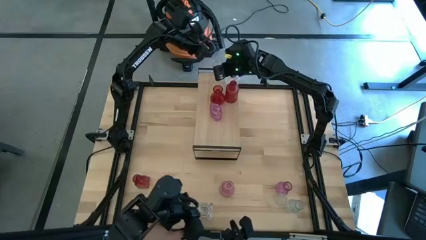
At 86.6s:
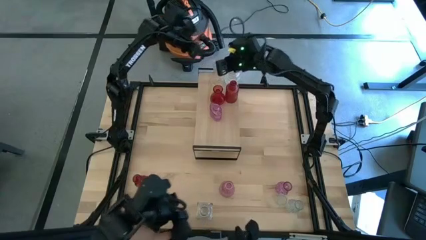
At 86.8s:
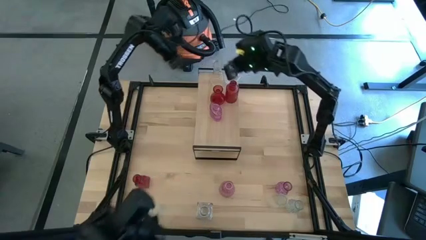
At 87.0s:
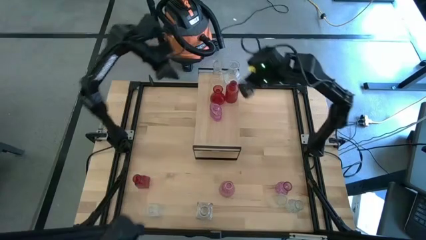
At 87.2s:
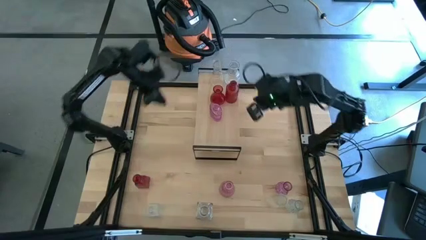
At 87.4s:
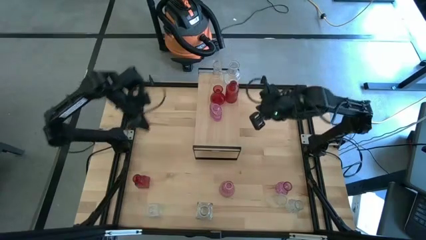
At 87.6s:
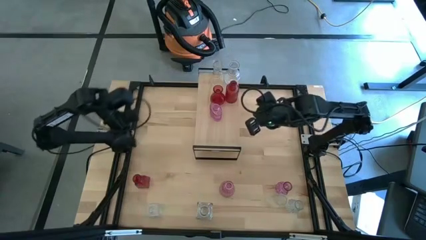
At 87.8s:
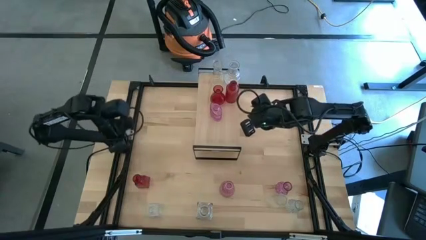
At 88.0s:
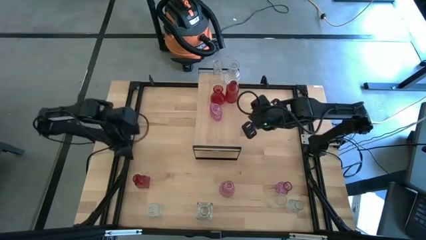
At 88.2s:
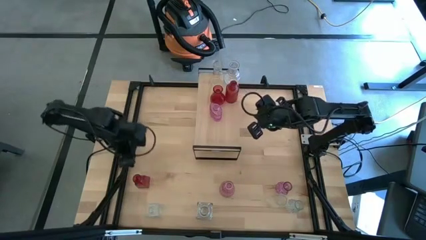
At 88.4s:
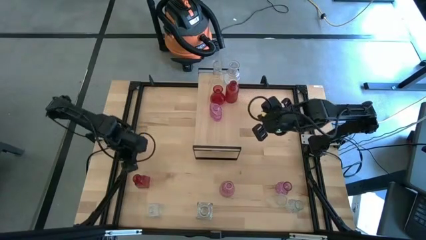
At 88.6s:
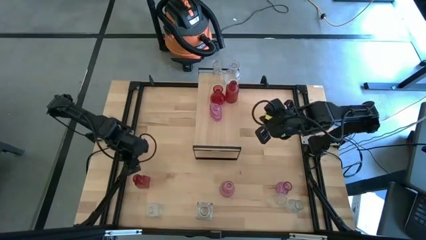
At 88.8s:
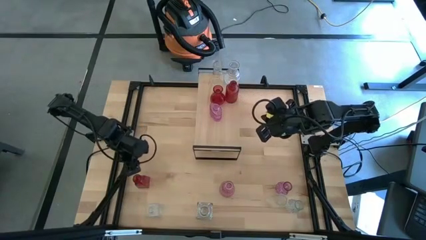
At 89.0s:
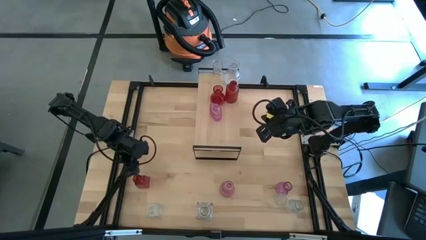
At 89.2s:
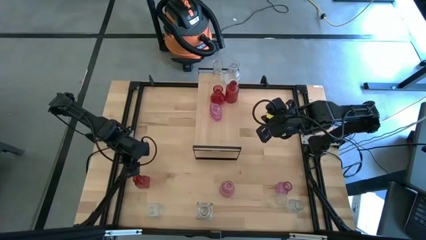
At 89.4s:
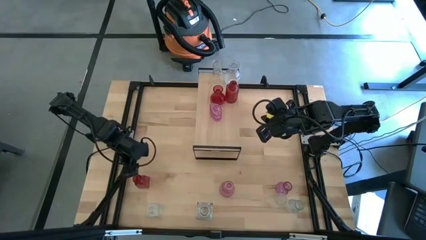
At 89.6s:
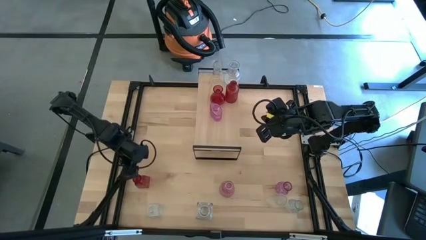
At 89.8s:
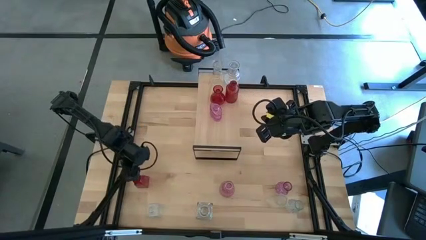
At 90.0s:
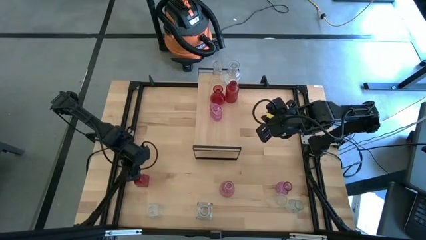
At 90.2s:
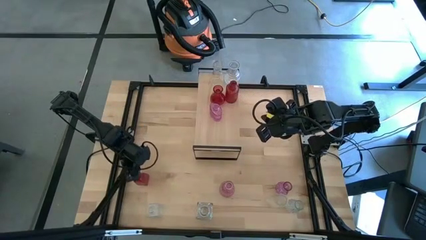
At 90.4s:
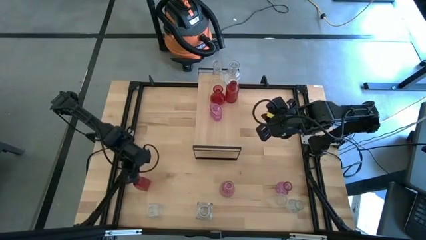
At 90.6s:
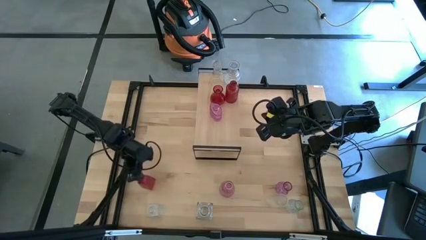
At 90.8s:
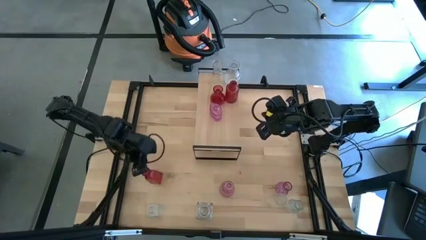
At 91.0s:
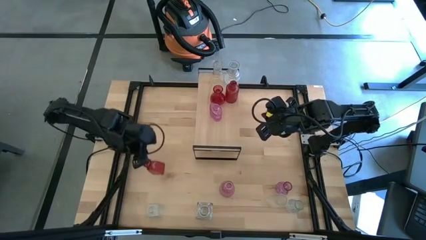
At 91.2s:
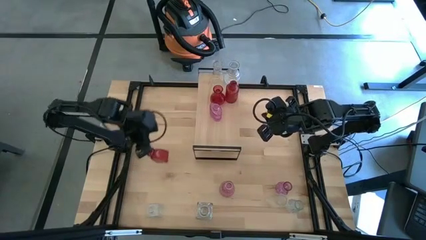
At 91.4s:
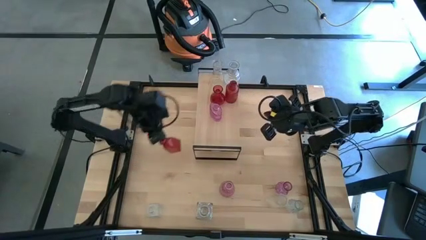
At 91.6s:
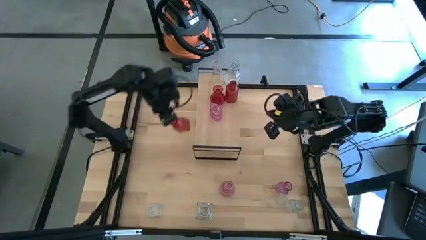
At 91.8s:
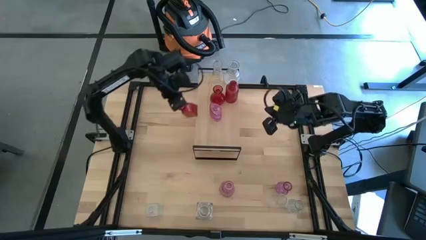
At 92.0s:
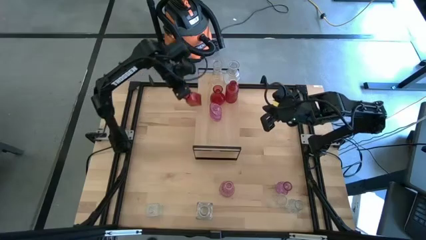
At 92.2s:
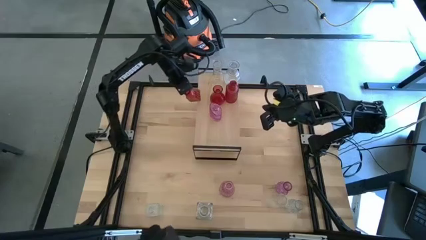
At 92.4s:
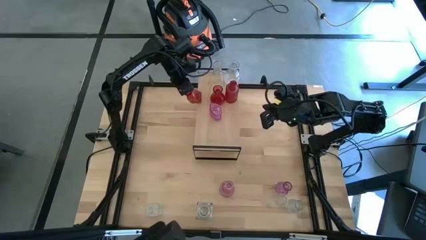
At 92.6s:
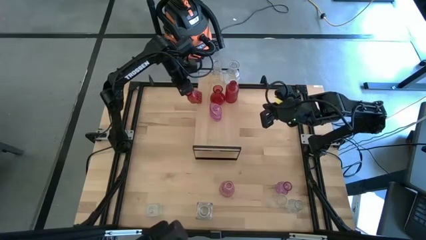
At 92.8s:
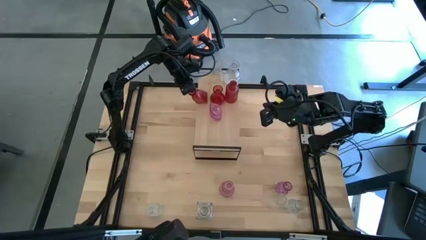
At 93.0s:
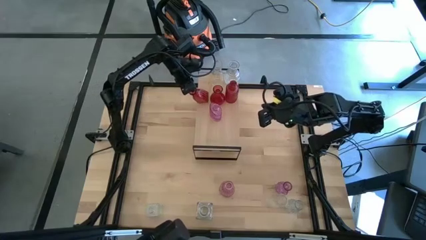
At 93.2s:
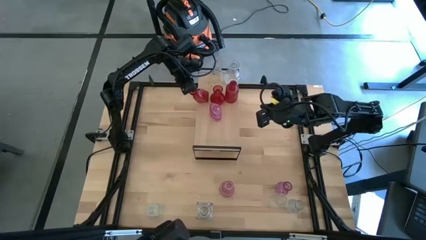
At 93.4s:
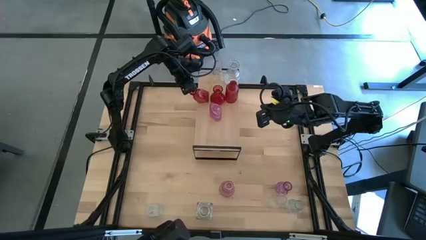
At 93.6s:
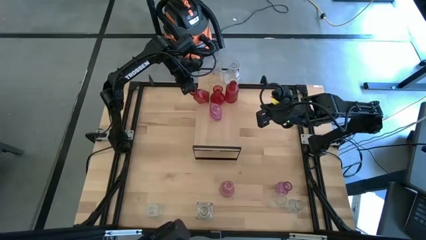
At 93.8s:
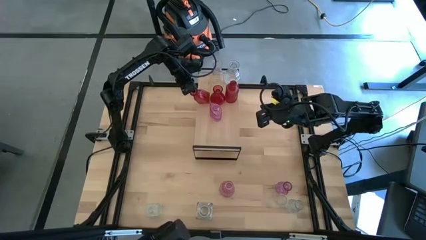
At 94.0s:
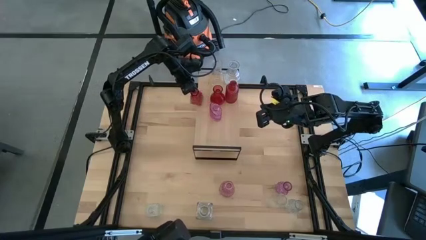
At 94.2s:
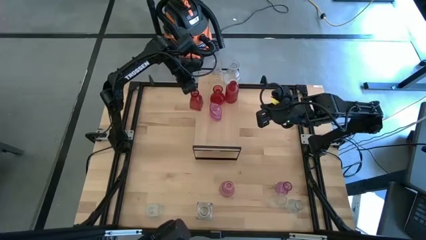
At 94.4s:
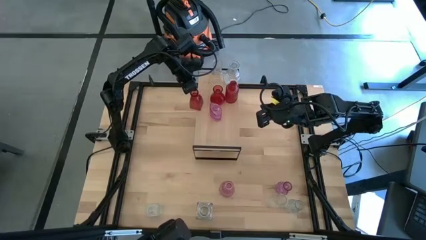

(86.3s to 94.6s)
Task: sort vases onto shelf
Put the red vase on the shelf aligned with the other red vases

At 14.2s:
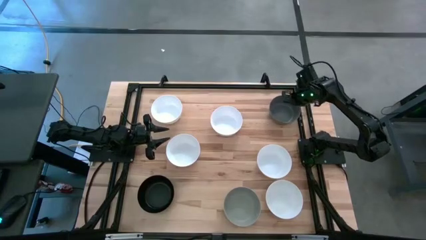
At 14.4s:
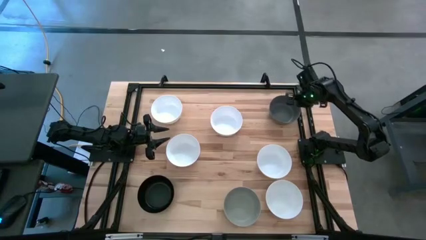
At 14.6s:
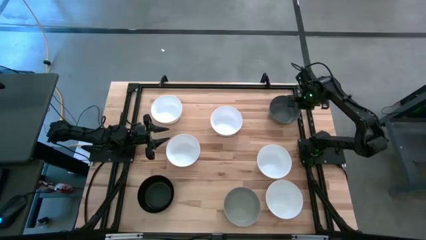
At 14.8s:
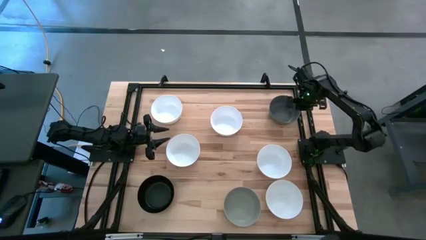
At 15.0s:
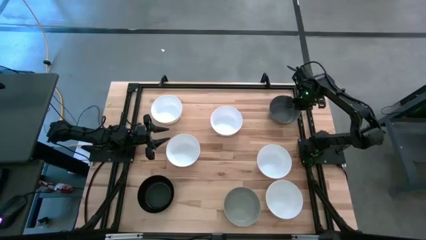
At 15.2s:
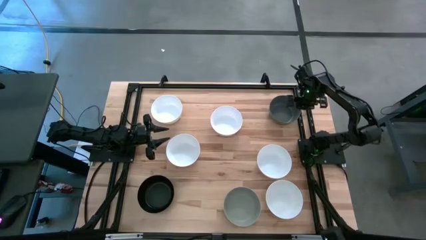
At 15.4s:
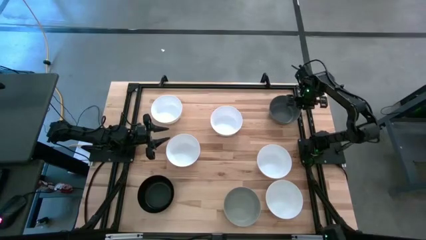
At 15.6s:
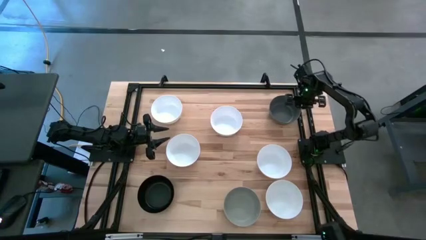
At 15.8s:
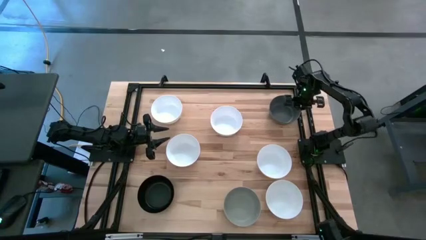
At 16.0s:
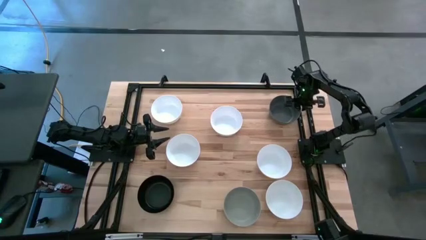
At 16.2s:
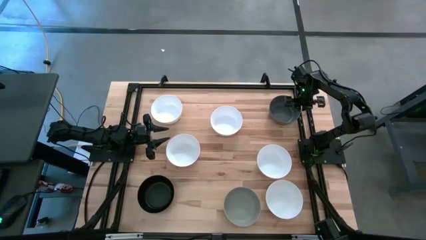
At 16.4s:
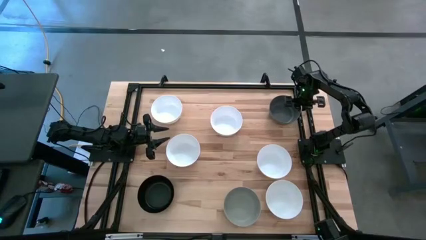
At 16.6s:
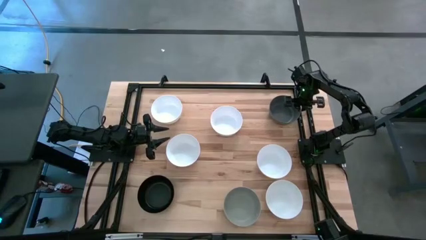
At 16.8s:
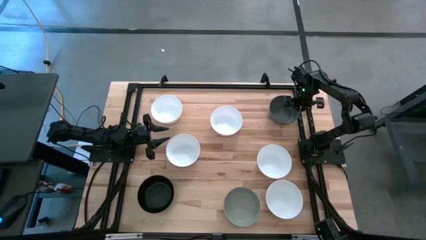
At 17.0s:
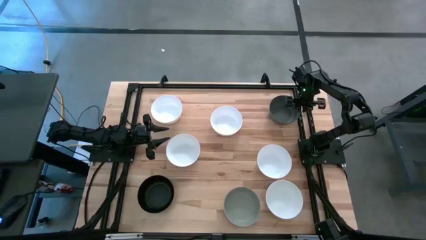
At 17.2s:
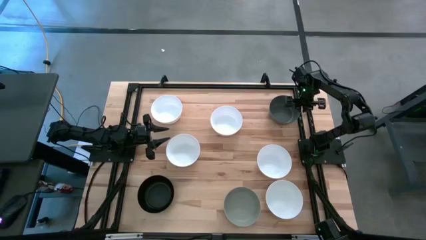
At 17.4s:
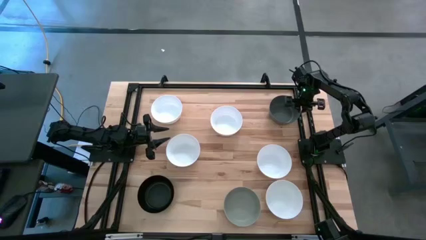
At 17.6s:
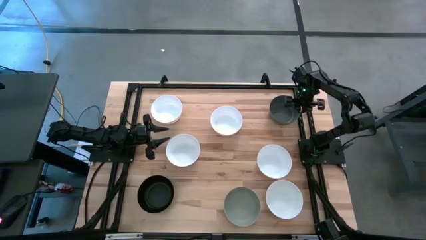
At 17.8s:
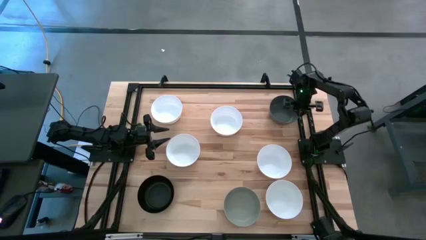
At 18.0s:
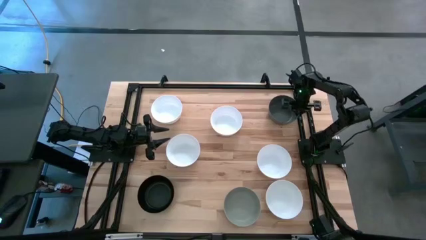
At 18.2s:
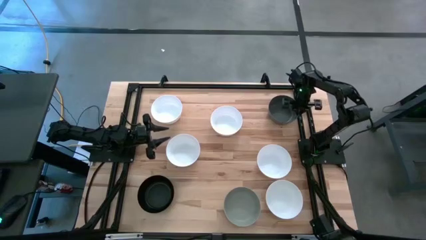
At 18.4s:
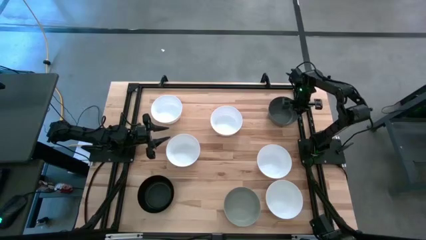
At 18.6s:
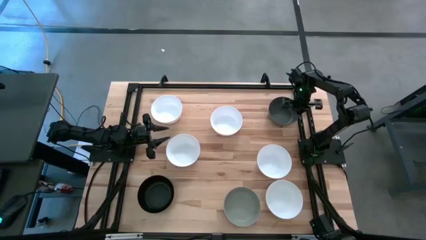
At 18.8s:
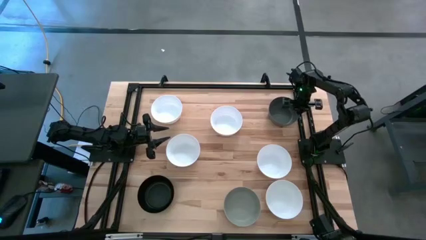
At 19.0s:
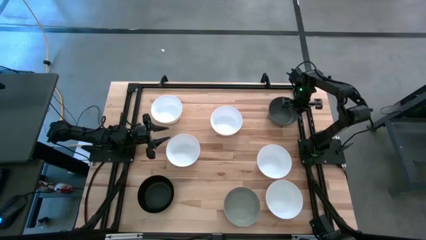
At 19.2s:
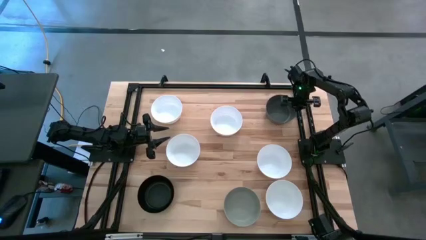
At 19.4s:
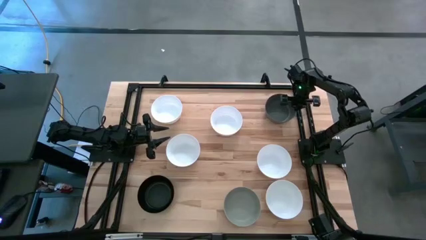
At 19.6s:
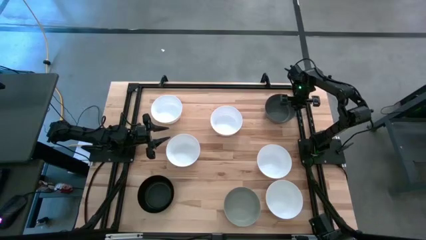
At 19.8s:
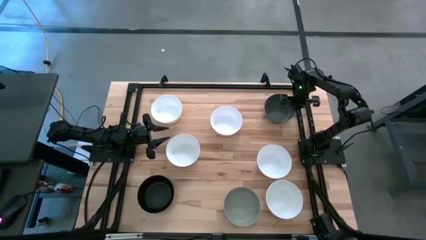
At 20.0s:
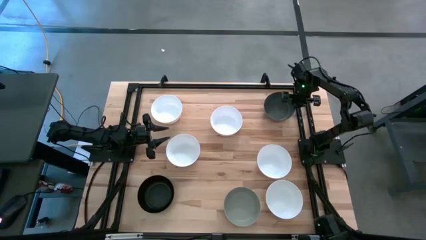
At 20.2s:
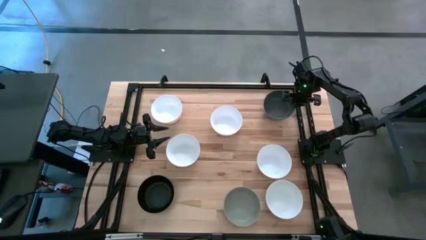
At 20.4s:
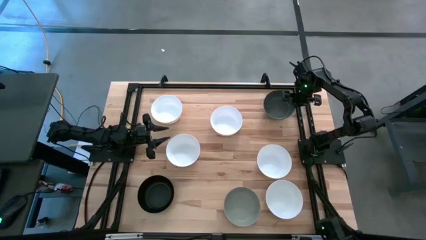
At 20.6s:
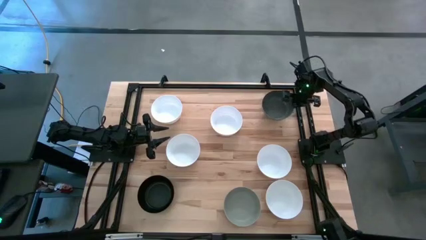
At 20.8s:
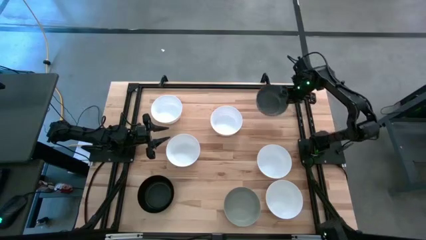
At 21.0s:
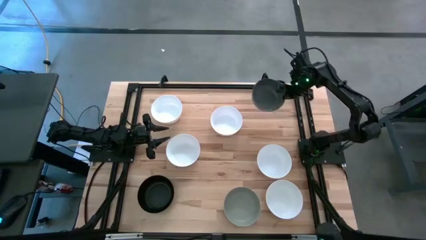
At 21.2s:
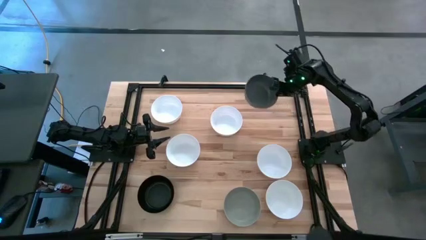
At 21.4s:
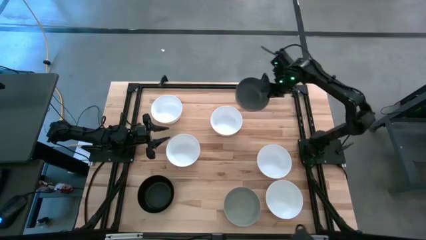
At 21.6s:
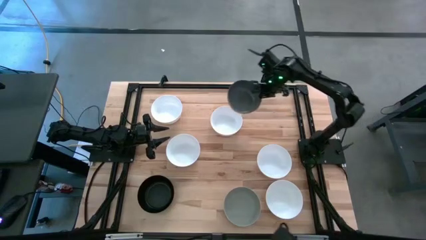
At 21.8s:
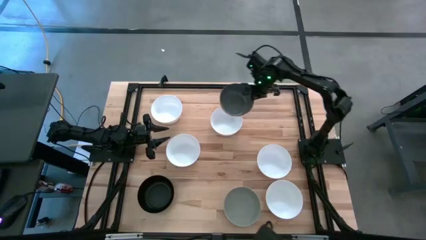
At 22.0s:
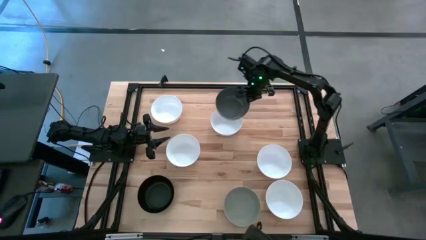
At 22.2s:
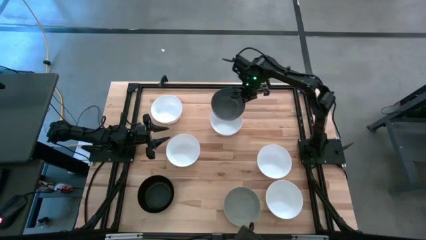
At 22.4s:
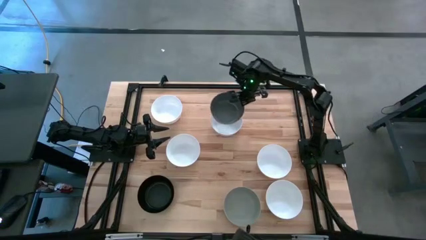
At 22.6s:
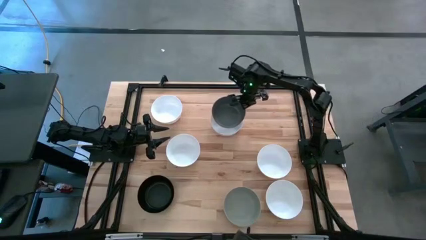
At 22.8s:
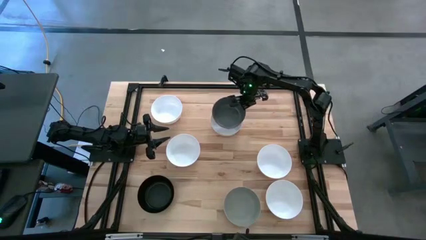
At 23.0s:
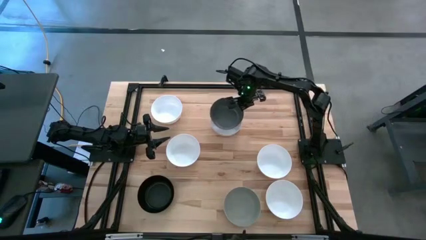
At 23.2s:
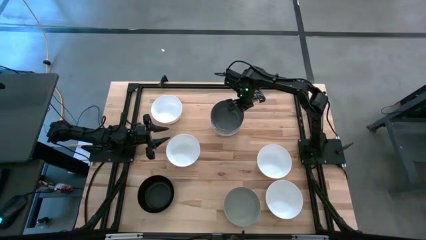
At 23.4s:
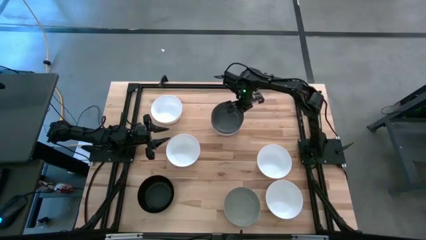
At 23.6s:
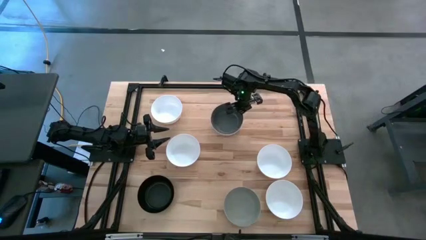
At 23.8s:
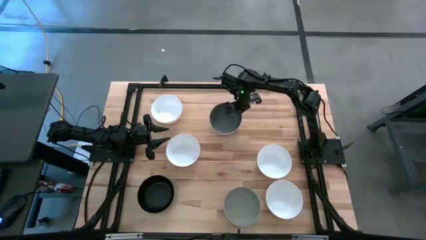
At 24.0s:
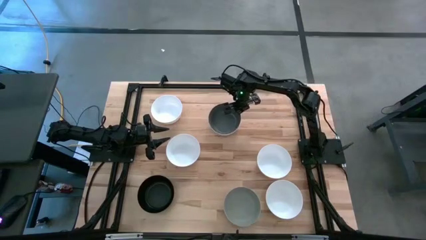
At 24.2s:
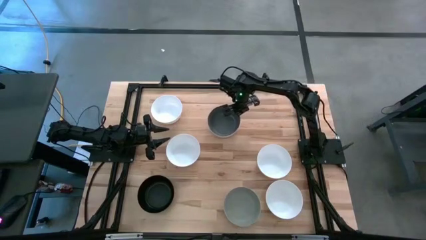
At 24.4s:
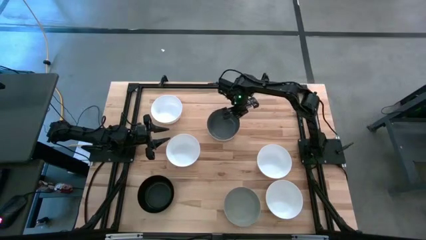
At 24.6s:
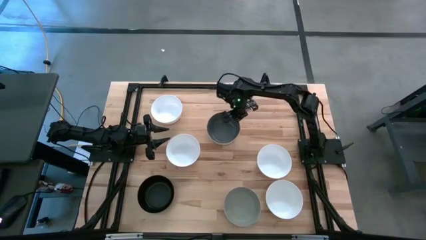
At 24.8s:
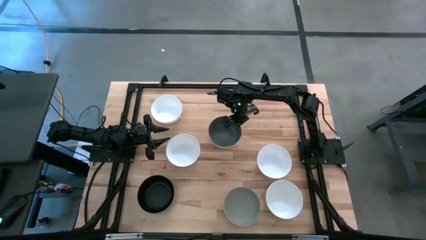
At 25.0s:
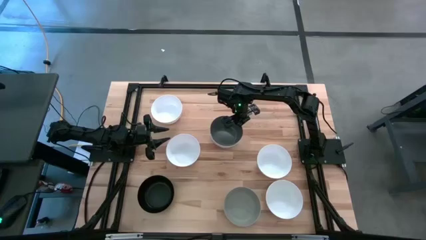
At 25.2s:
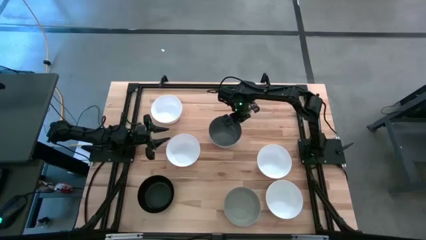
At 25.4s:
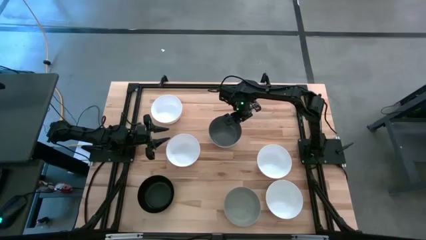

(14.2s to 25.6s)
Task: Nest bowls inside each other
Stack the gray bowl on top of the white bowl
